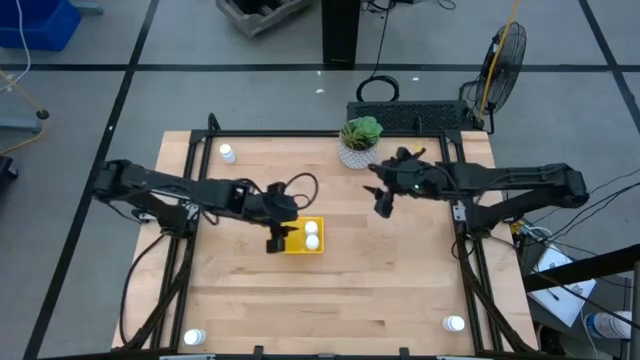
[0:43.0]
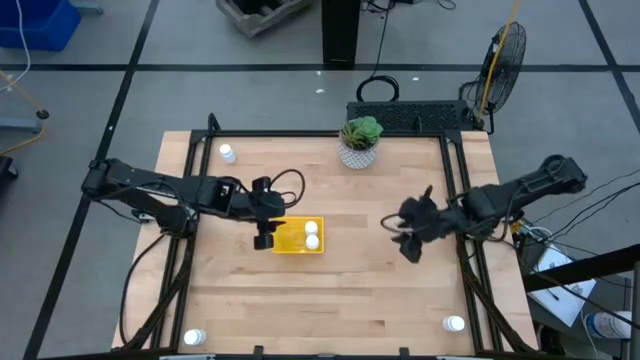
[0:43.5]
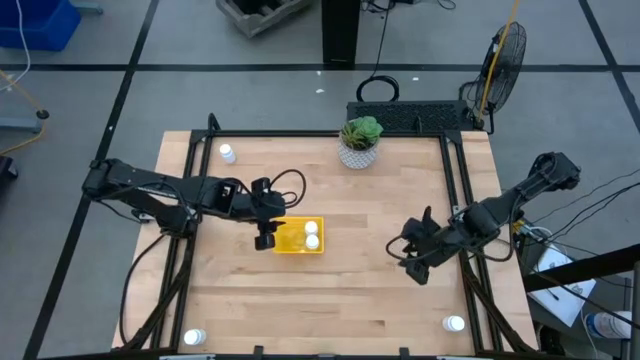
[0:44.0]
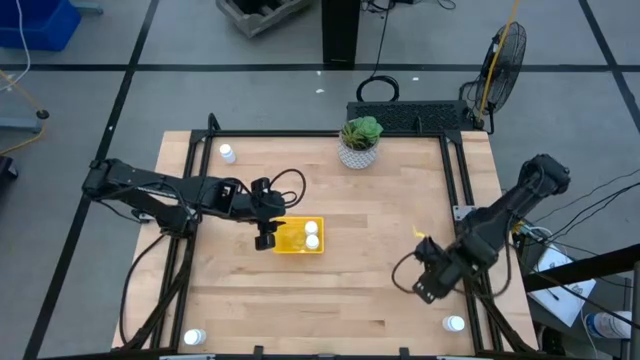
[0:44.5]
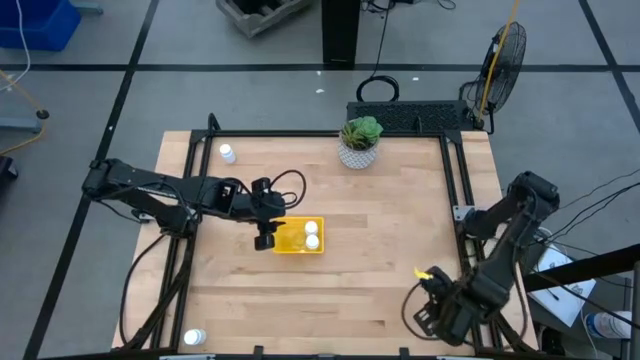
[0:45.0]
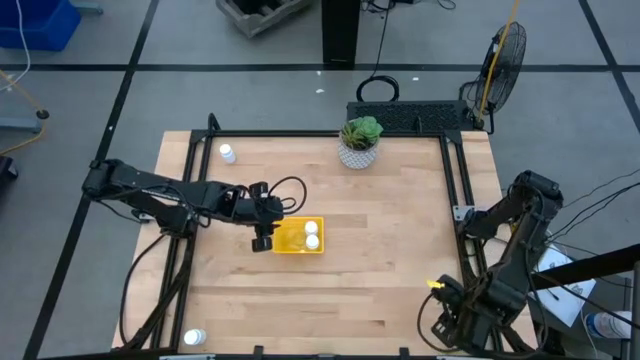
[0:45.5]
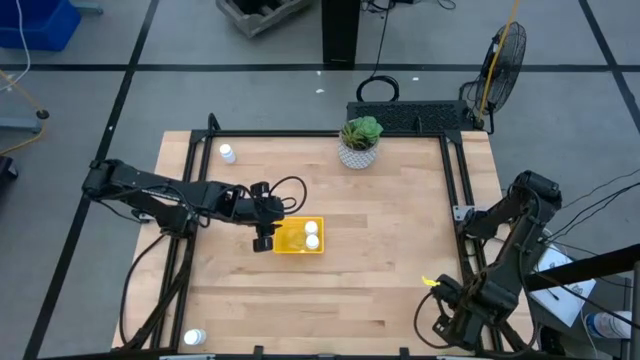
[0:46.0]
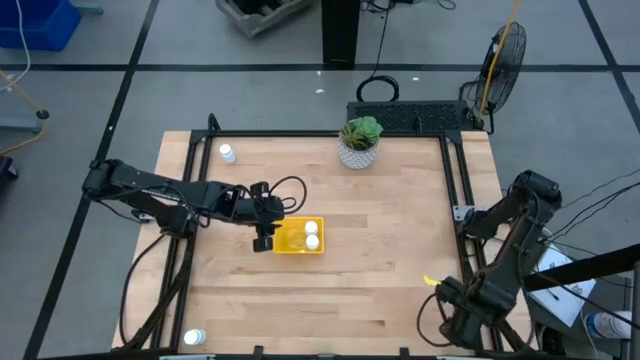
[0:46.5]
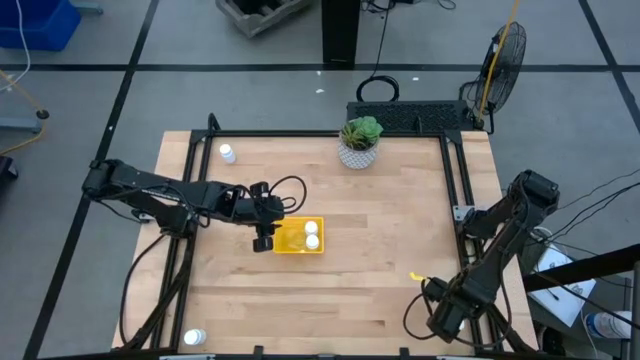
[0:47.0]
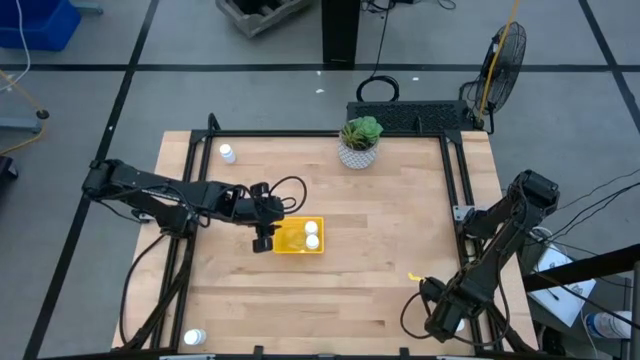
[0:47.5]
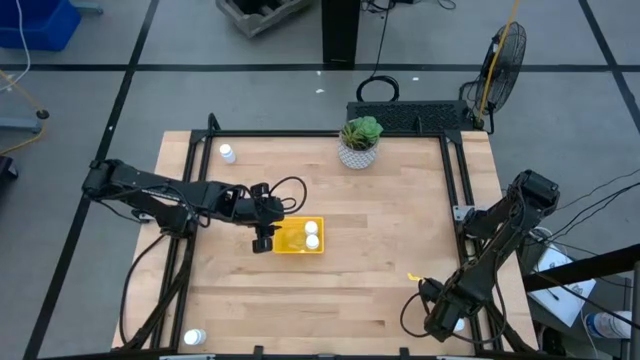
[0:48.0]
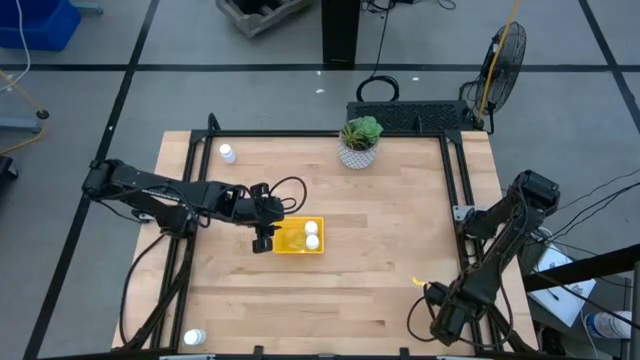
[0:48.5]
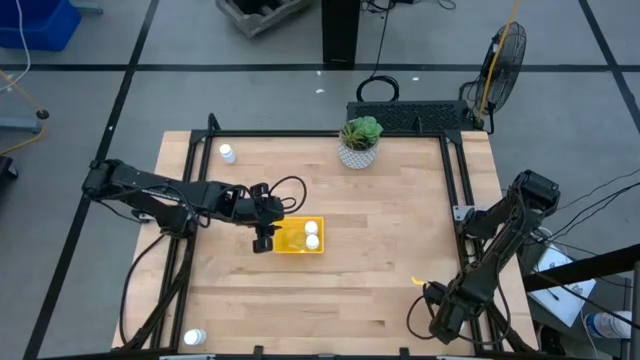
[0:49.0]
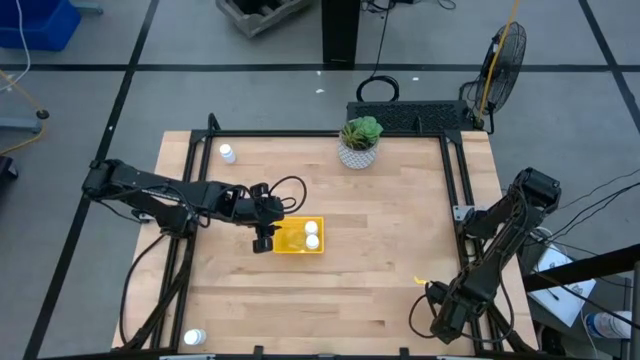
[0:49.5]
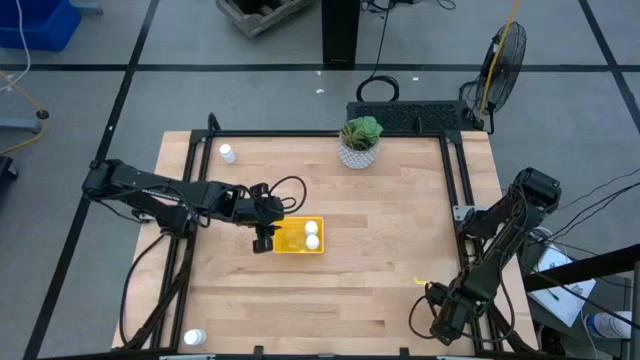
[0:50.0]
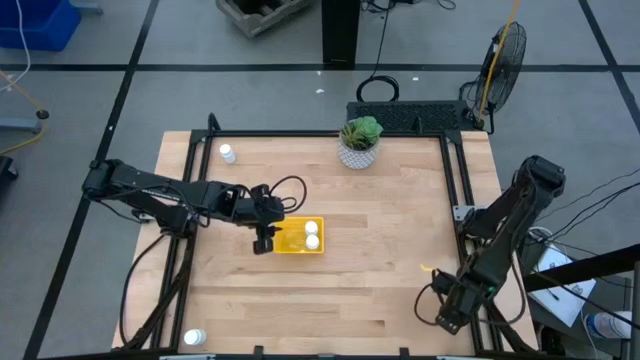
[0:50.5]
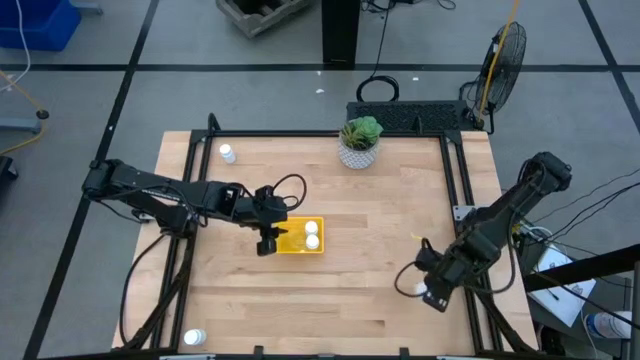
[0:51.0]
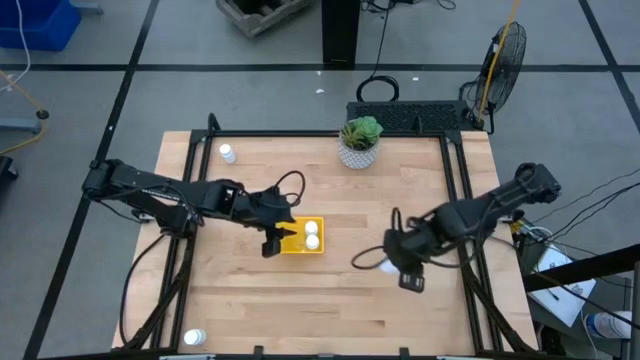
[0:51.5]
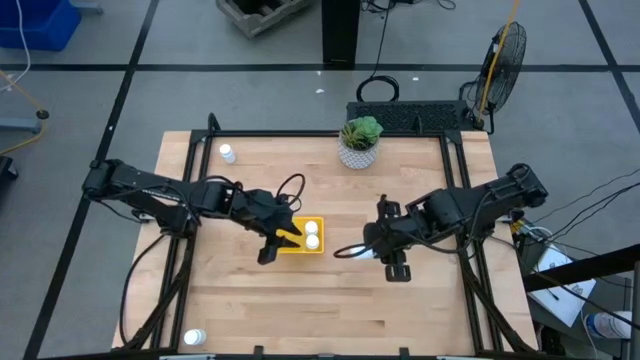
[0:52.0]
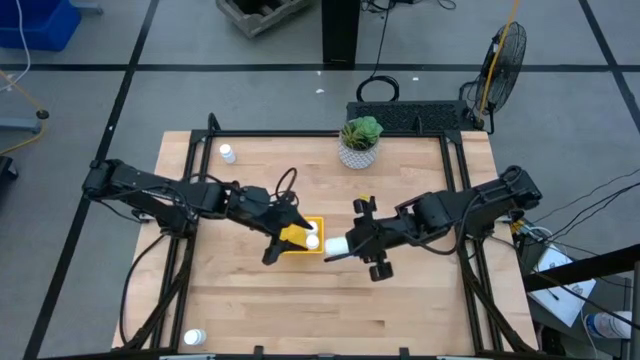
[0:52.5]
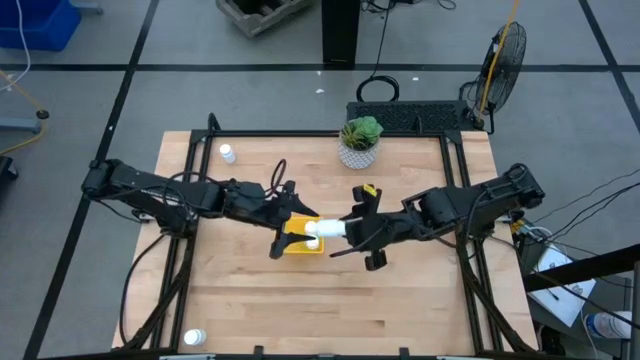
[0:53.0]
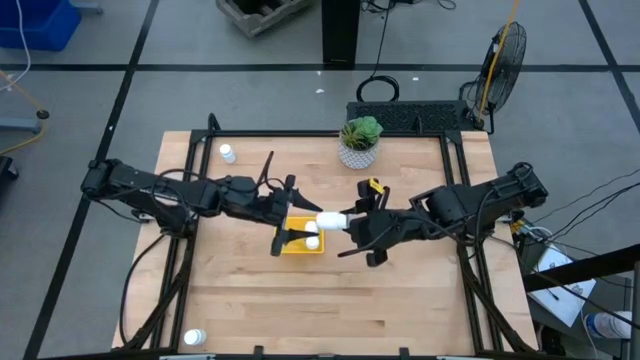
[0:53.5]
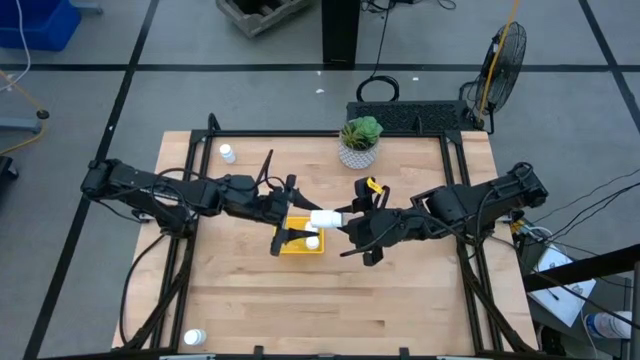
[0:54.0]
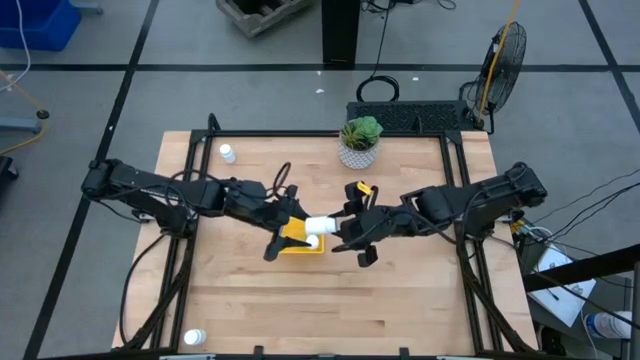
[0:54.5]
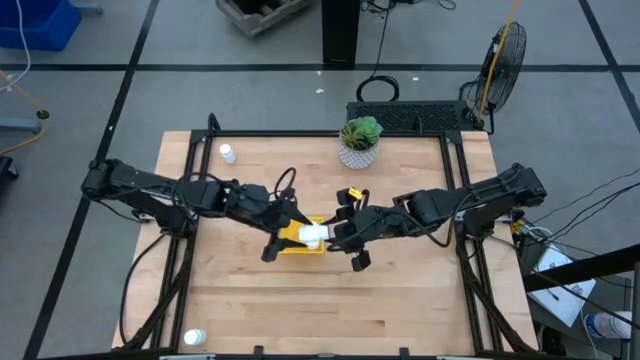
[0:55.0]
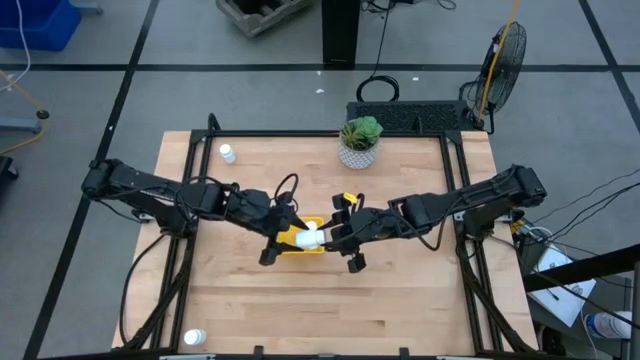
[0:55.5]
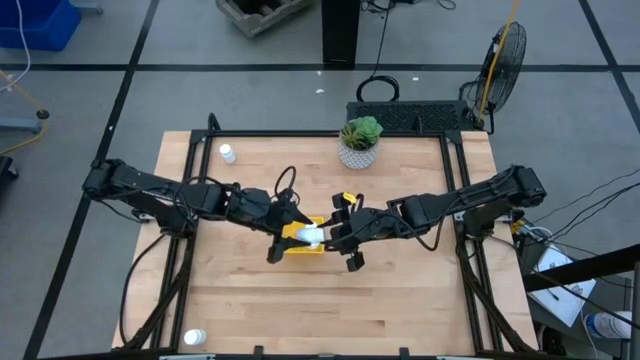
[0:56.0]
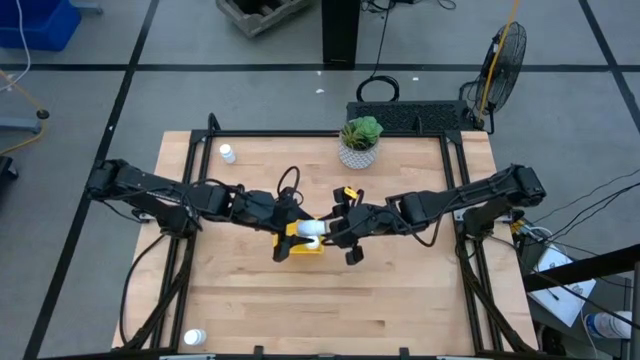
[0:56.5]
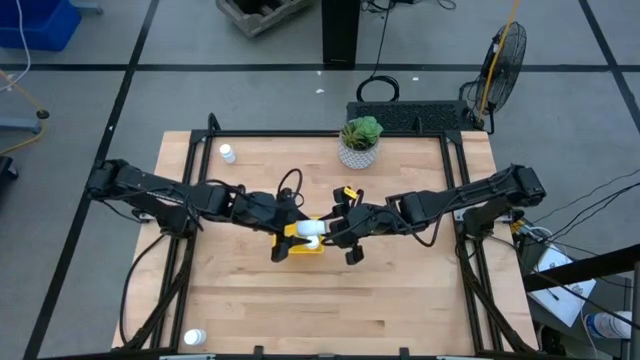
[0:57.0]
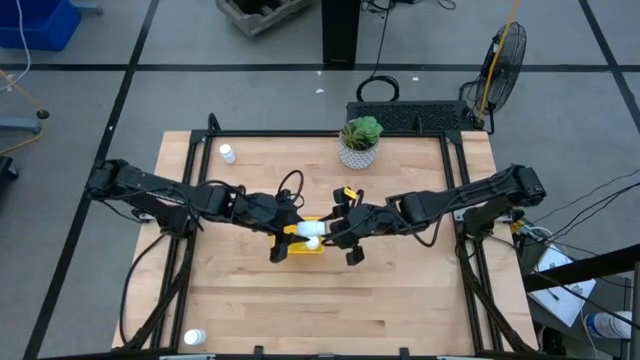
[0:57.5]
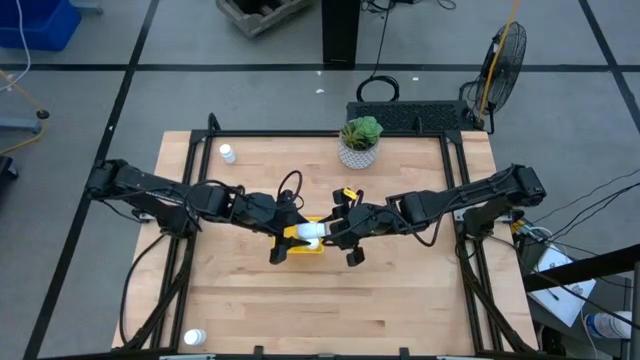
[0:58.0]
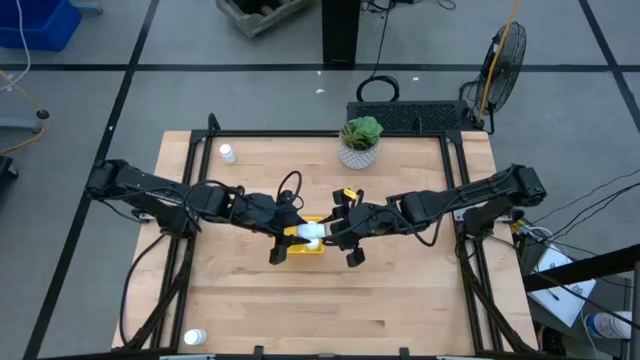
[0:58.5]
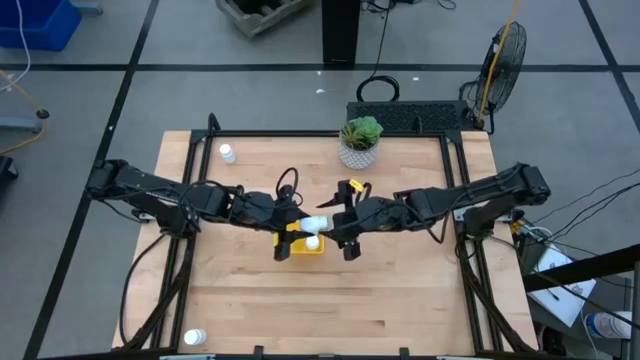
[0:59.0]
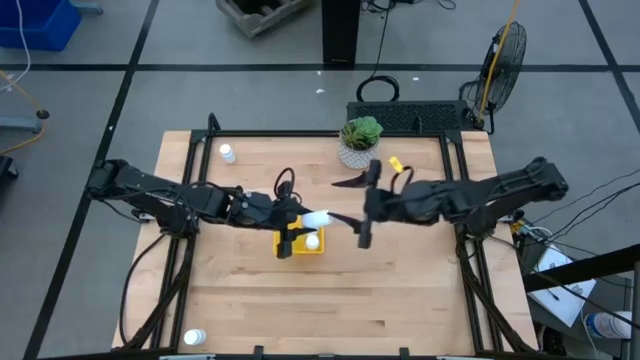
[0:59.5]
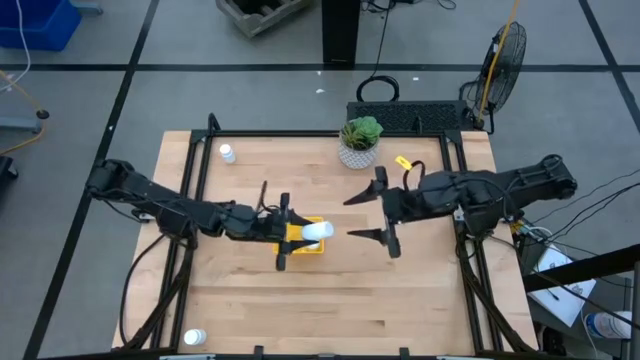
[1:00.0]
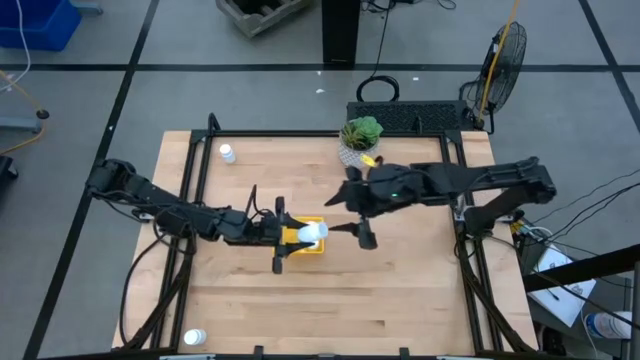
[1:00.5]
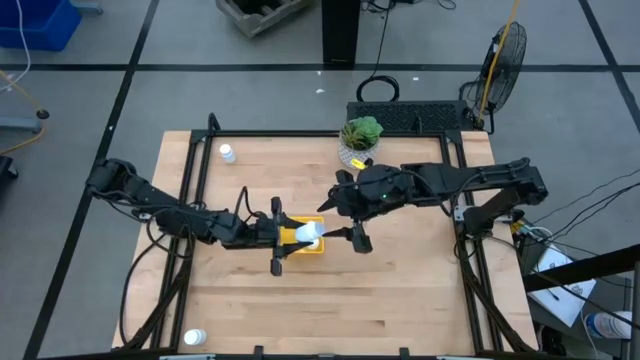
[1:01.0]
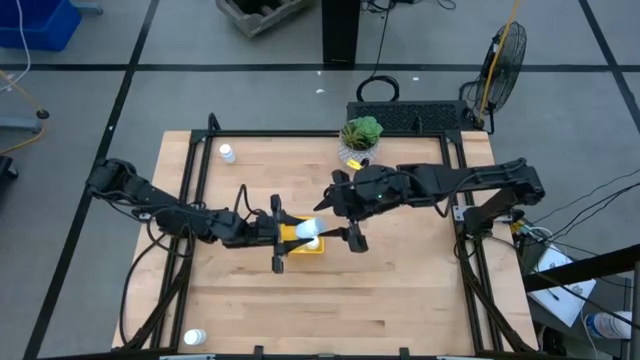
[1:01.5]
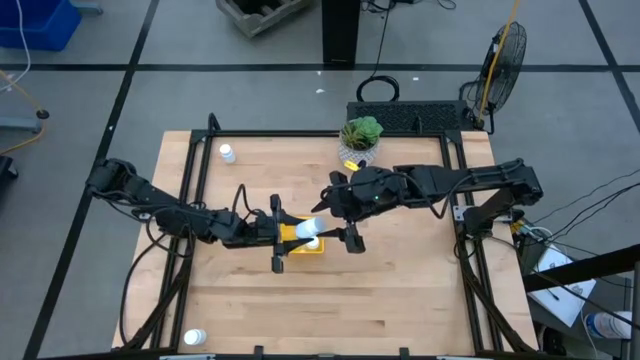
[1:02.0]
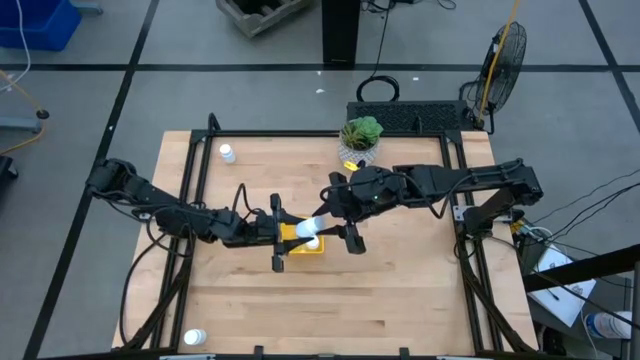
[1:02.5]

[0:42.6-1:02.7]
Task: Pick and place pill bottles into a basket
Put the white pill bottle into the yellow bin
